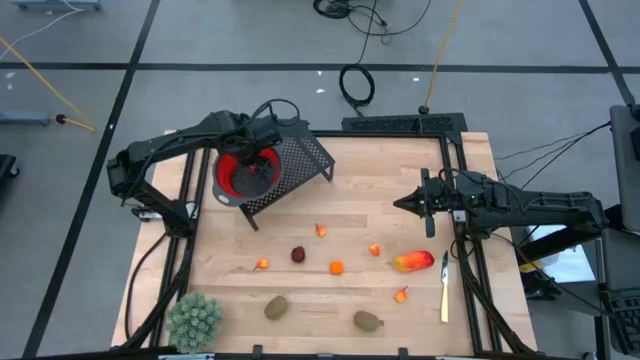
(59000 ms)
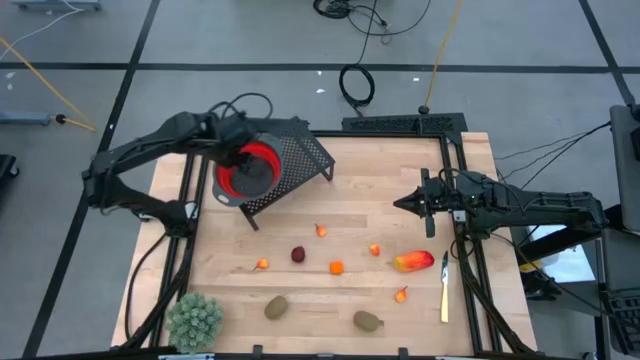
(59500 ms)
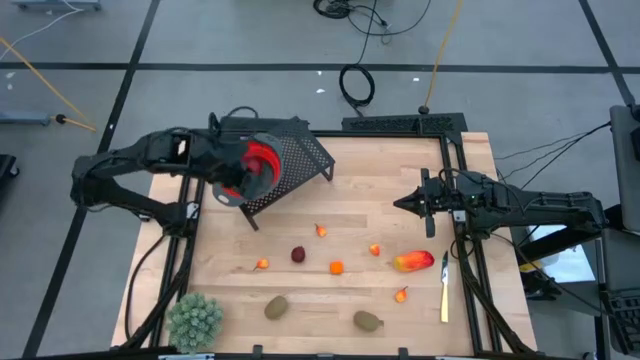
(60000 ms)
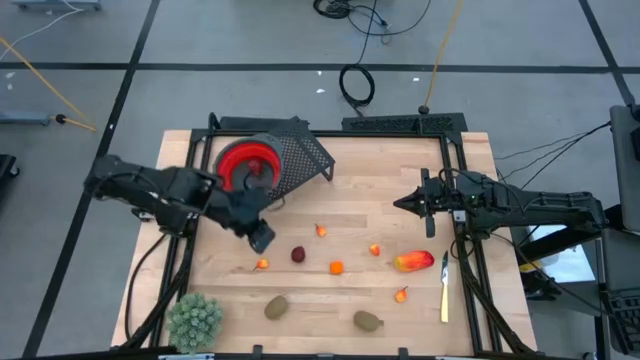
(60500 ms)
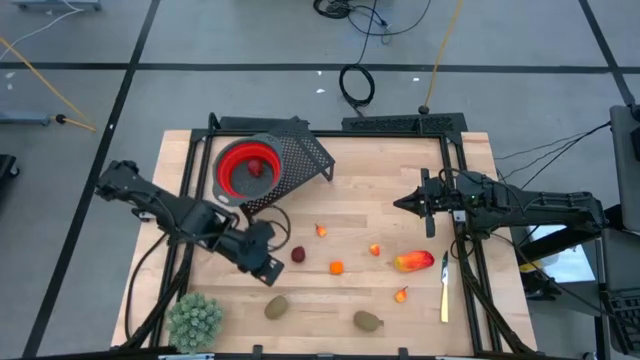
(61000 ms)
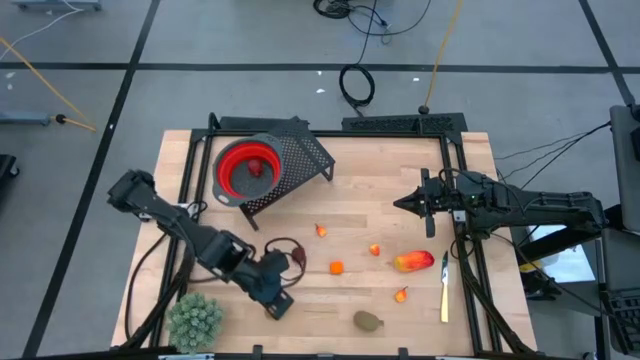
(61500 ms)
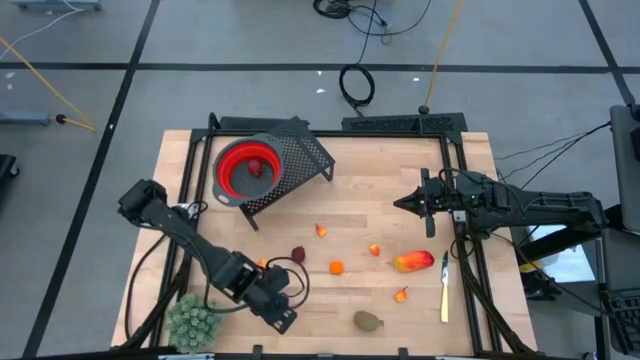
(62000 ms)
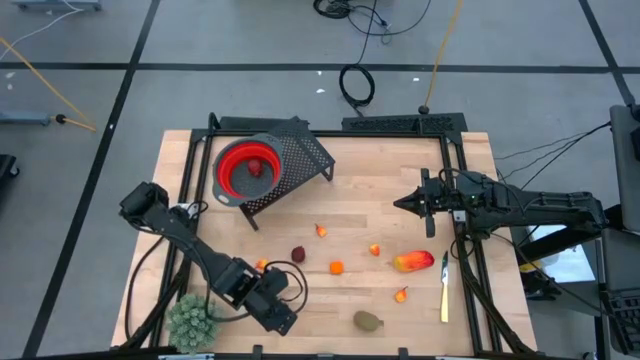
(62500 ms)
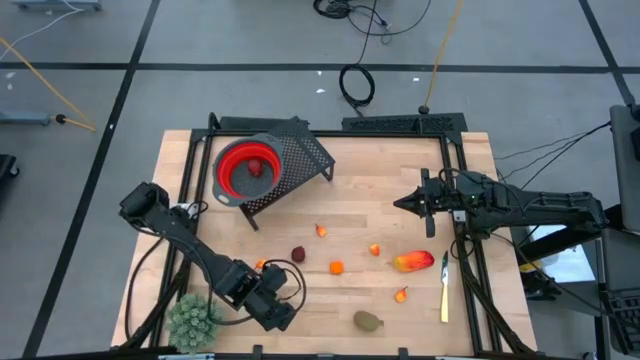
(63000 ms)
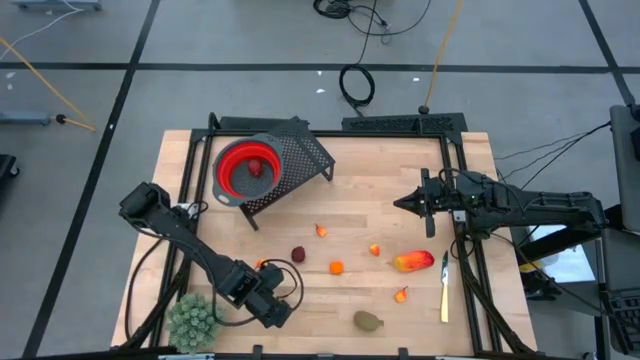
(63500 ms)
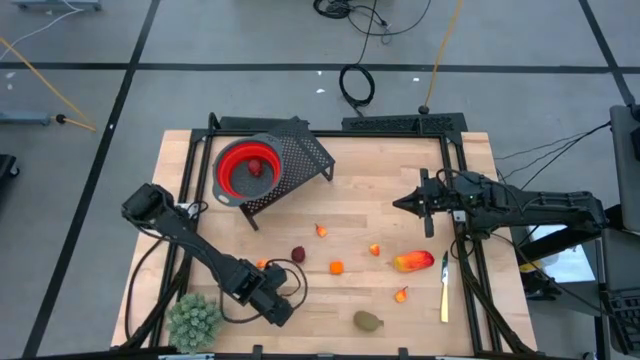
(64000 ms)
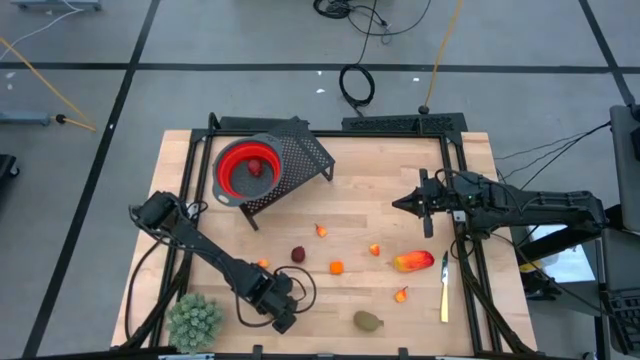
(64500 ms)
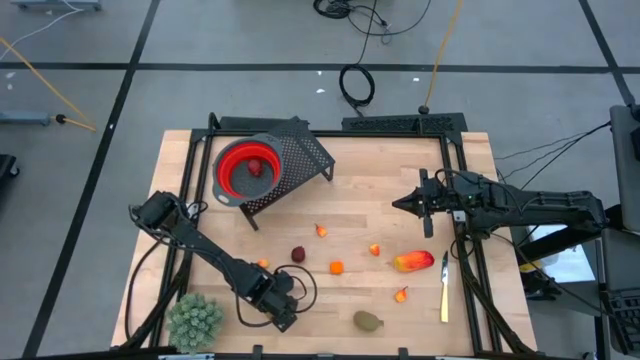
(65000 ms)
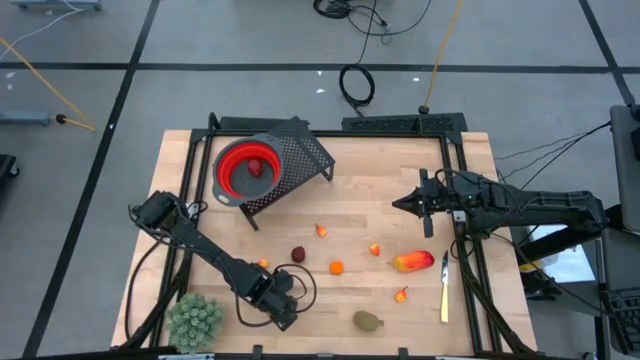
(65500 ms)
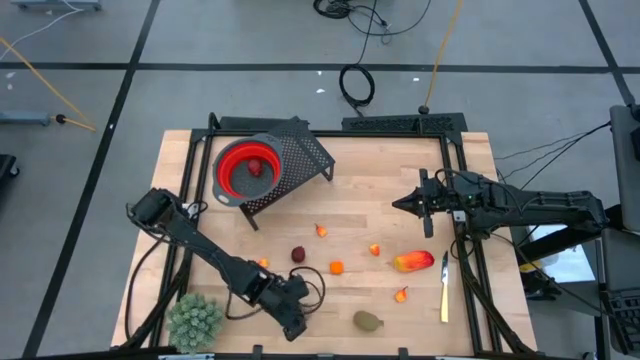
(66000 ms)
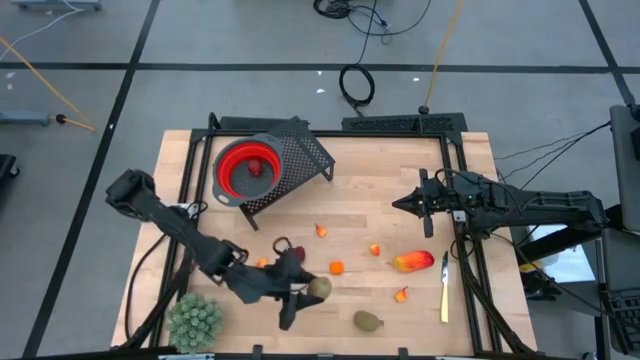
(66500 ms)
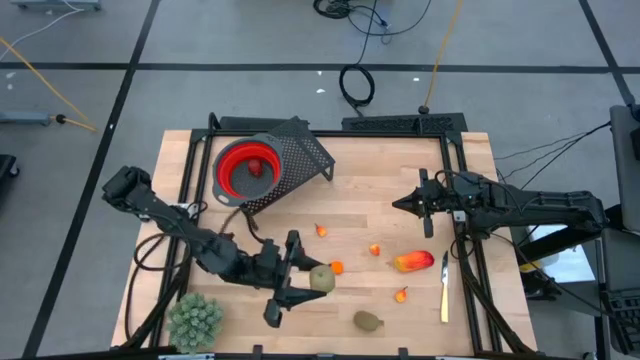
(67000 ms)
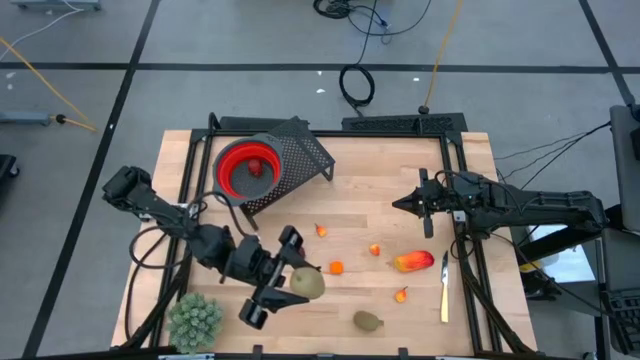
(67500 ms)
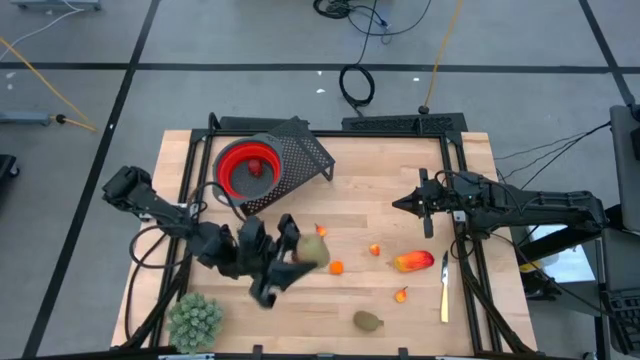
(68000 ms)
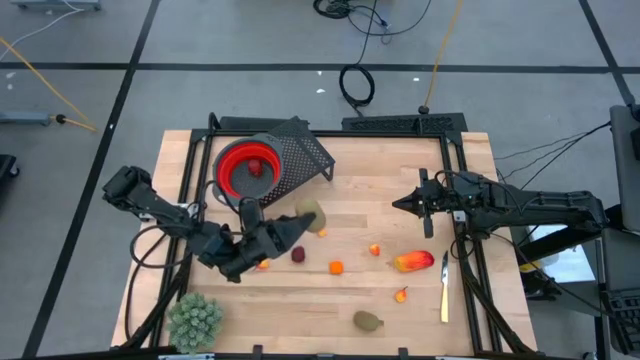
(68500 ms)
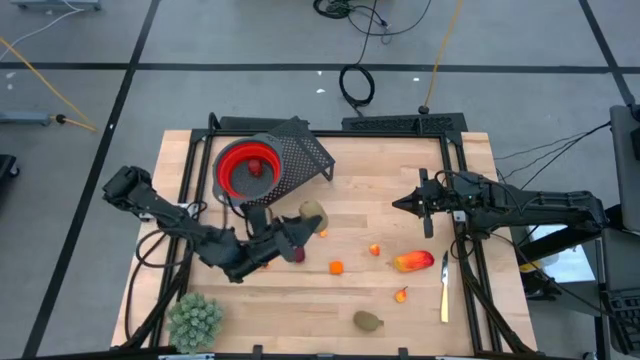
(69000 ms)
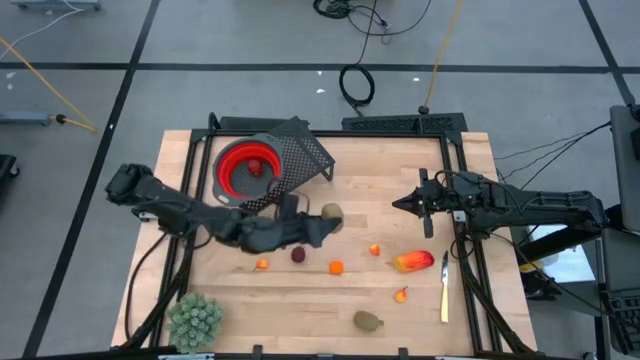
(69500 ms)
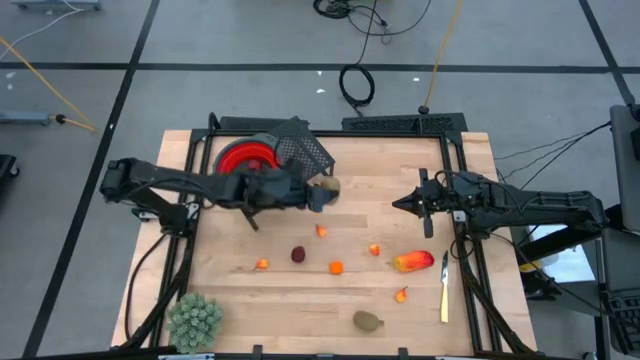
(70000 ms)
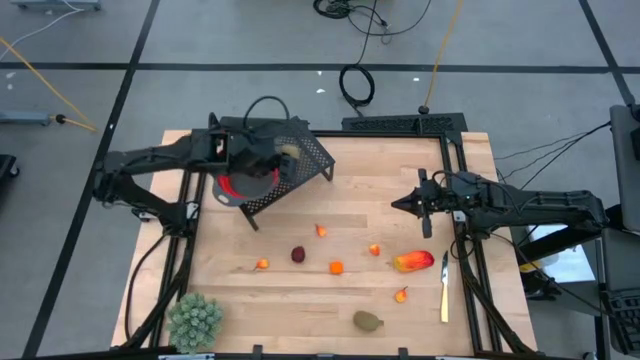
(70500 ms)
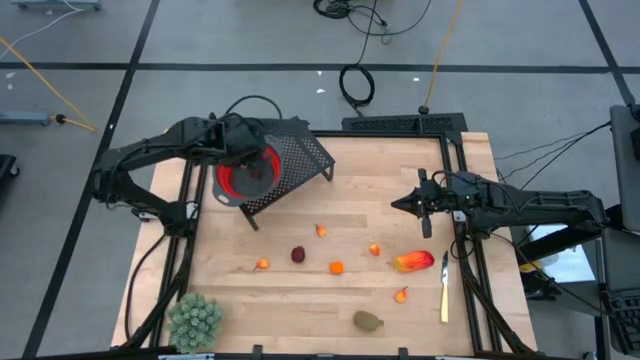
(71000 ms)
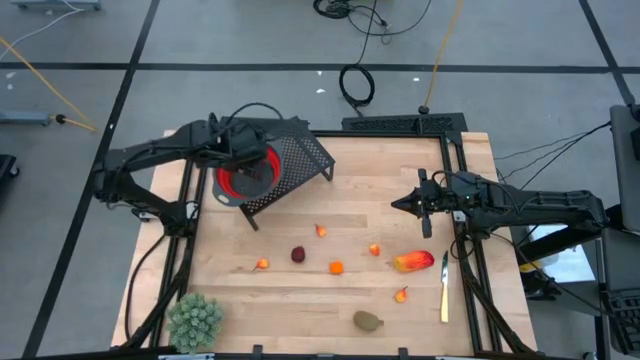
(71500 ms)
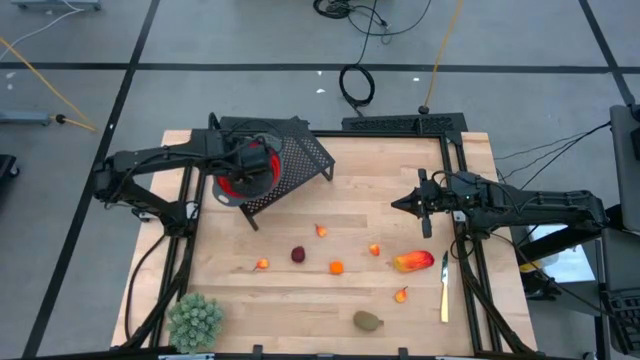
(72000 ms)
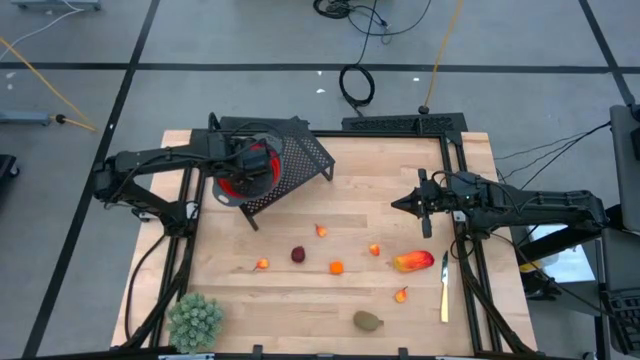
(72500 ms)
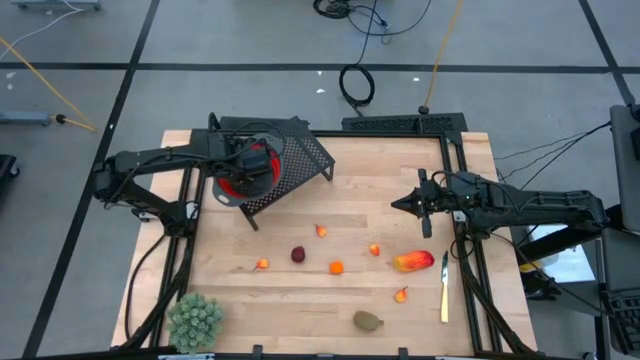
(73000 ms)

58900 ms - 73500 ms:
Task: Pick & Place Fruit
Put the kiwi into the red strainer bowl on the shelf

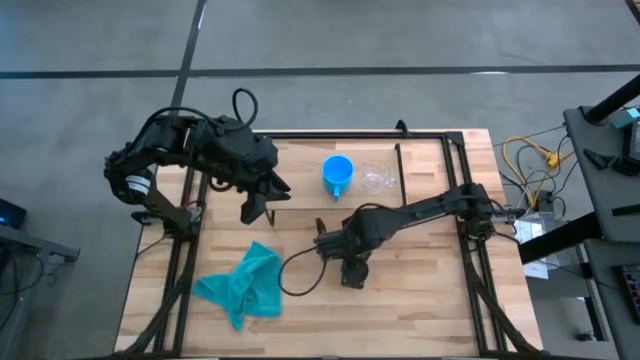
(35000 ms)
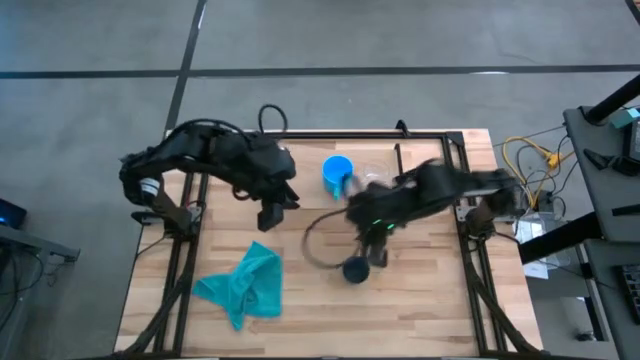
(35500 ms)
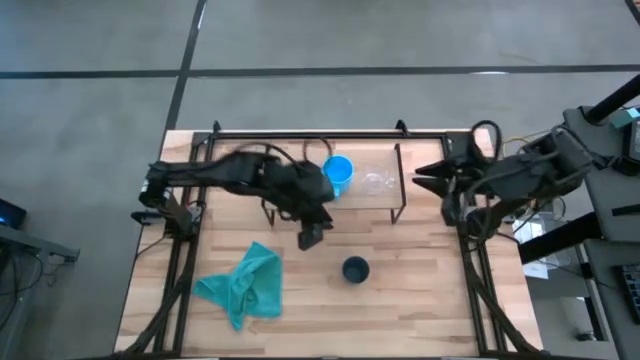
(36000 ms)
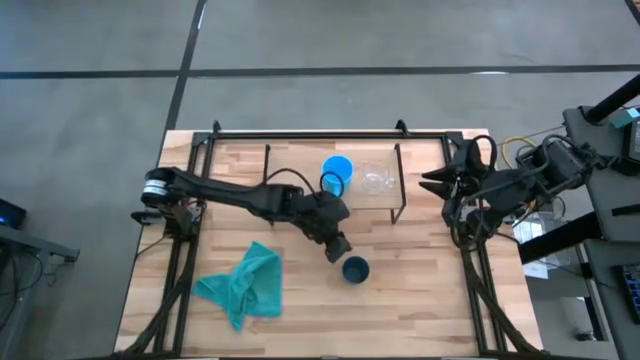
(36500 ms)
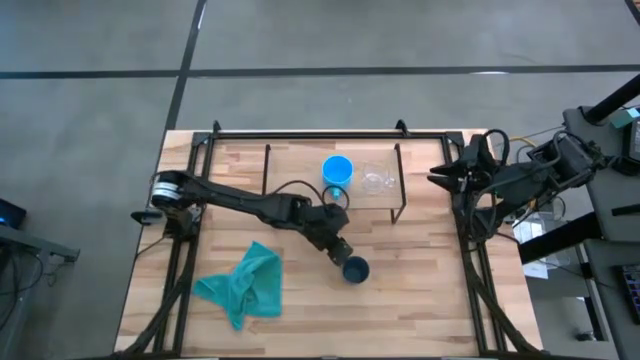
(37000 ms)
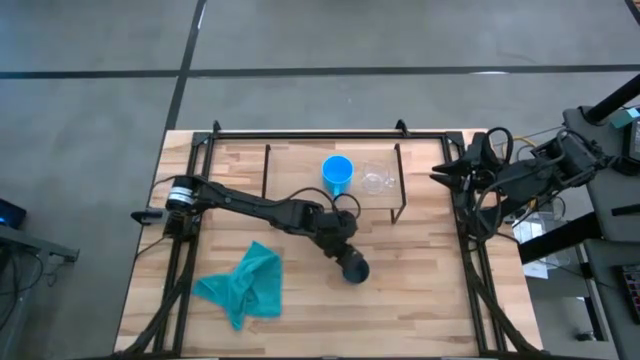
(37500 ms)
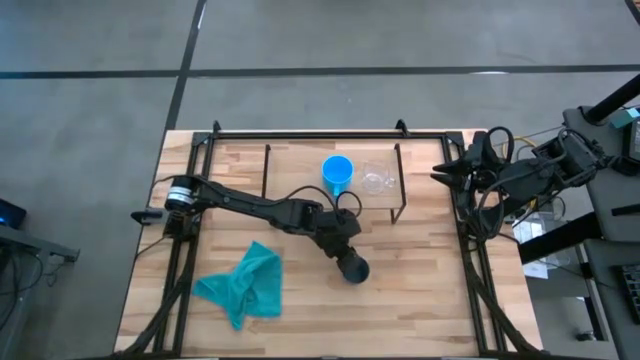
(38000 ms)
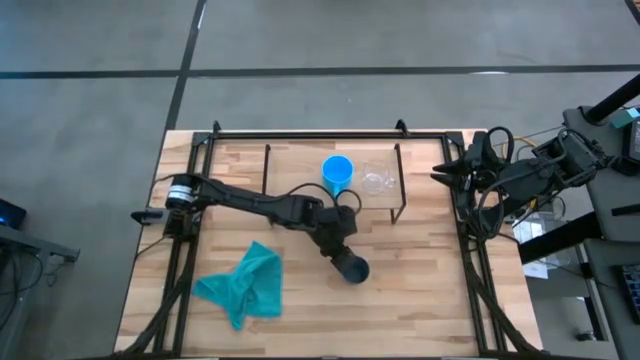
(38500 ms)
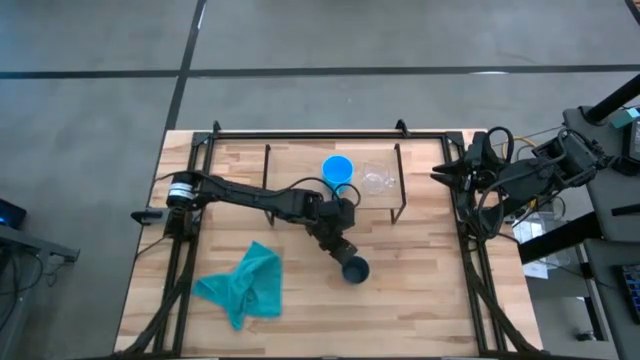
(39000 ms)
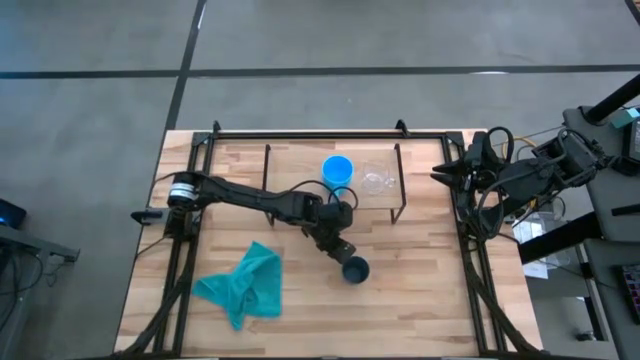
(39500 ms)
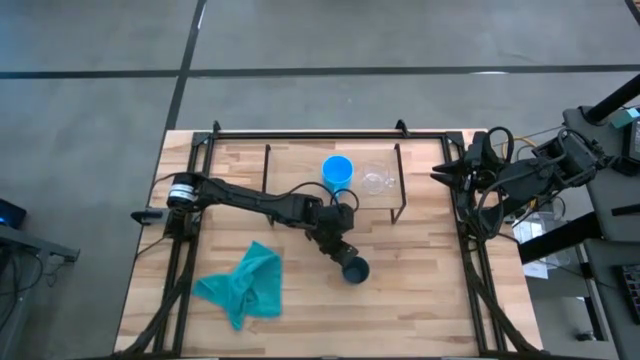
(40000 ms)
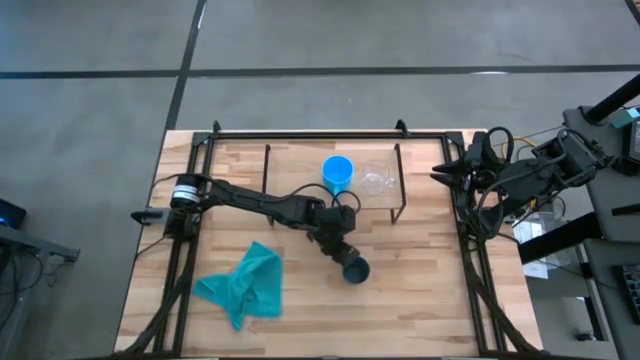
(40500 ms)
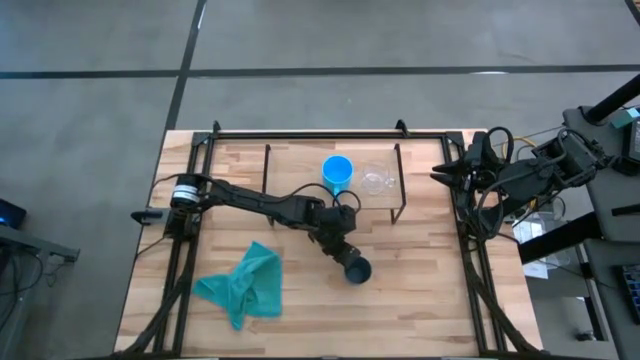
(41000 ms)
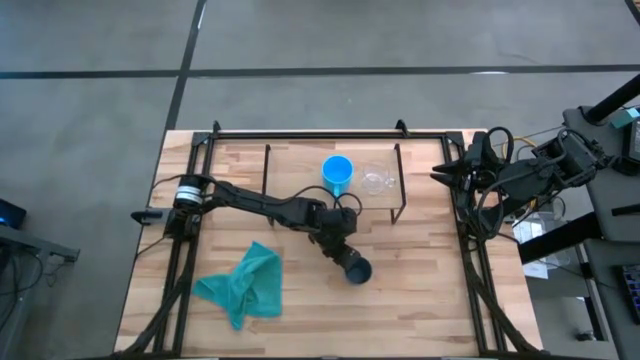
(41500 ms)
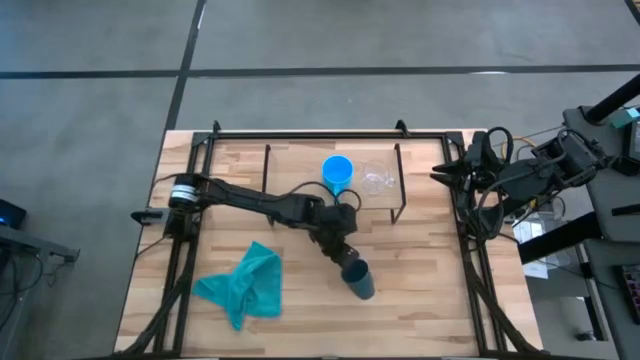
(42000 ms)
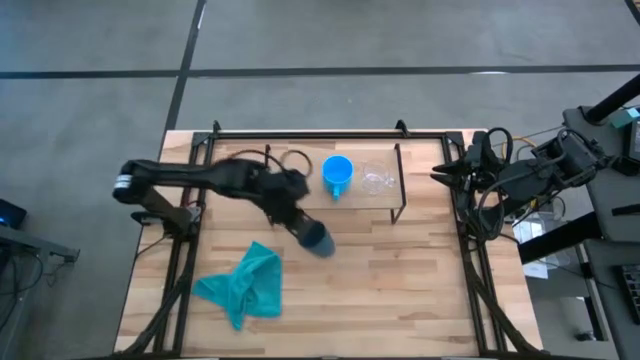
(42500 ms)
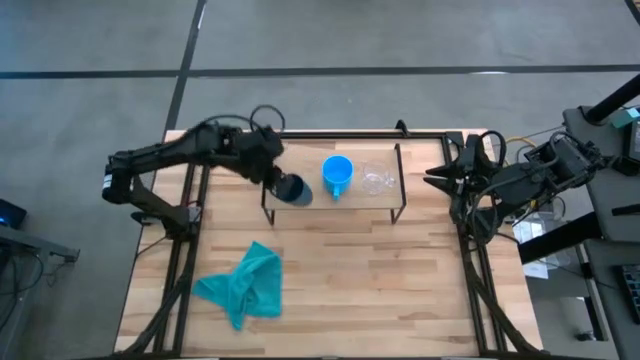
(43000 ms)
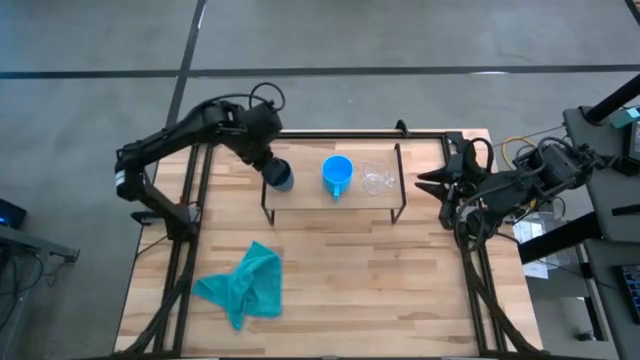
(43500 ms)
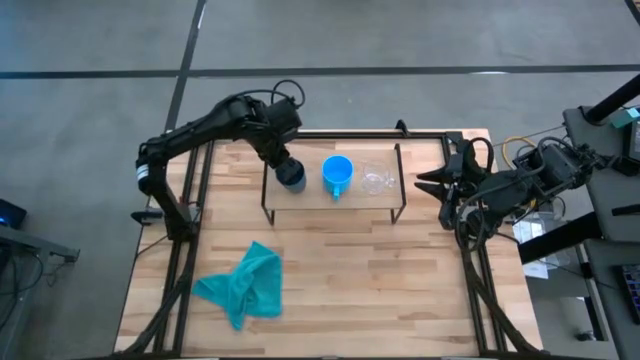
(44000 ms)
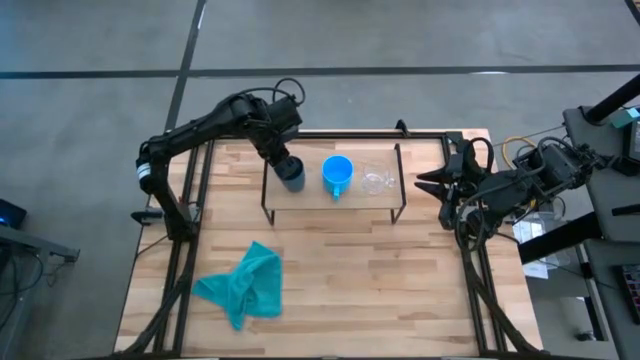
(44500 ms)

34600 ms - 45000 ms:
Task: Stack small to large cups/mugs on shelf
Put the blue cup on the shelf
